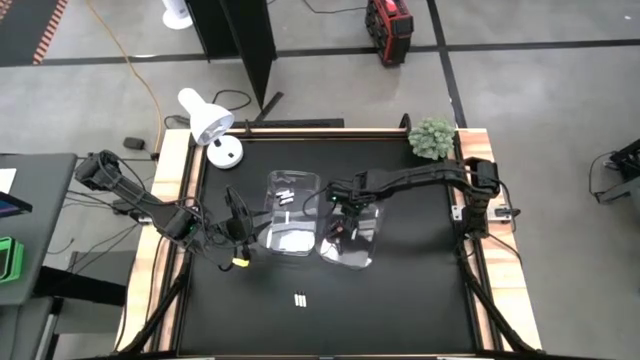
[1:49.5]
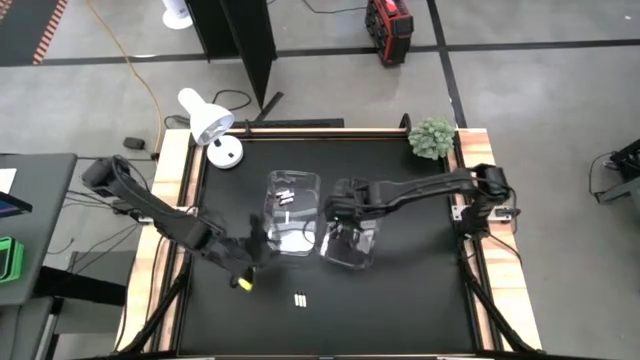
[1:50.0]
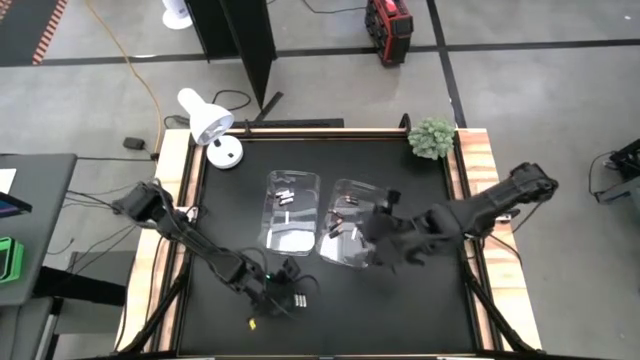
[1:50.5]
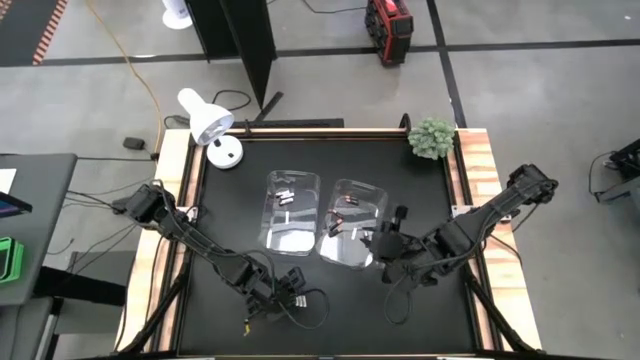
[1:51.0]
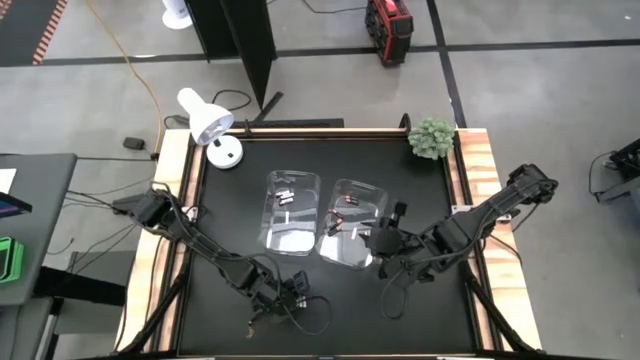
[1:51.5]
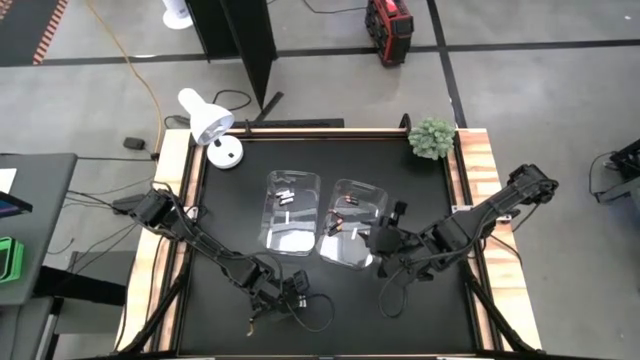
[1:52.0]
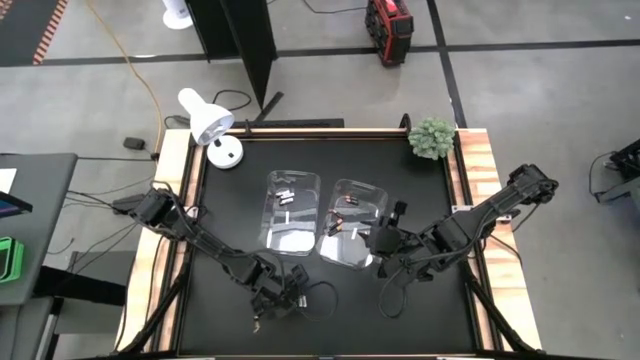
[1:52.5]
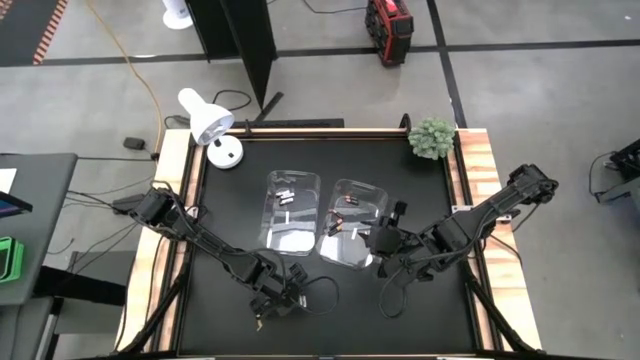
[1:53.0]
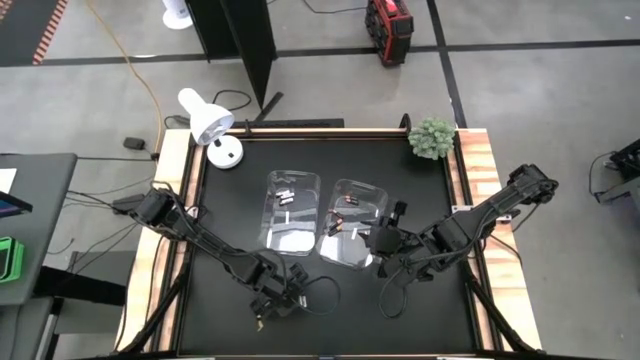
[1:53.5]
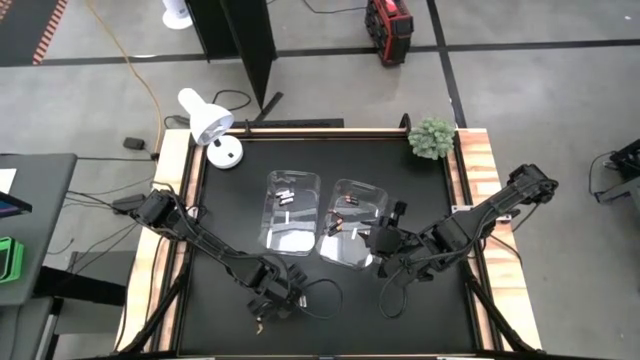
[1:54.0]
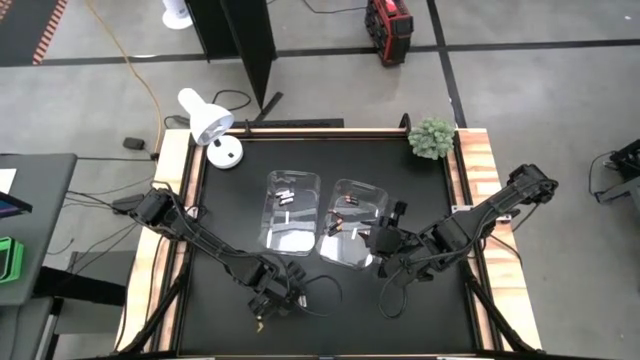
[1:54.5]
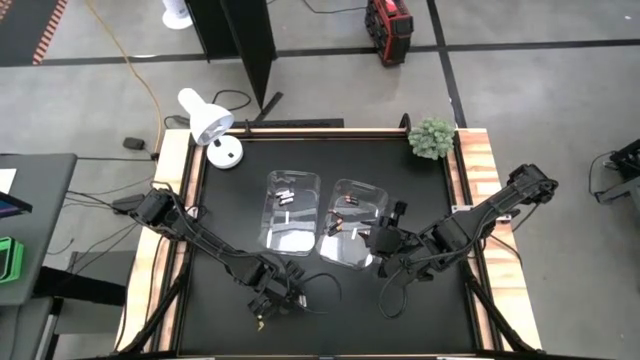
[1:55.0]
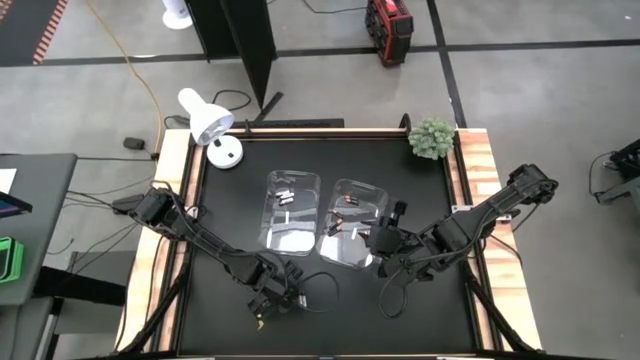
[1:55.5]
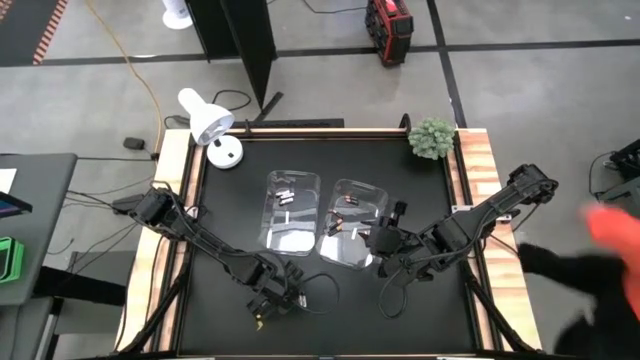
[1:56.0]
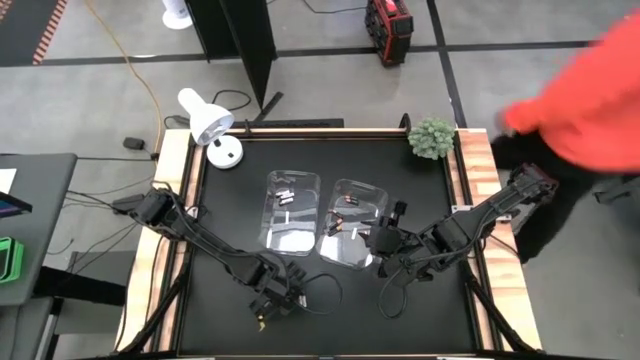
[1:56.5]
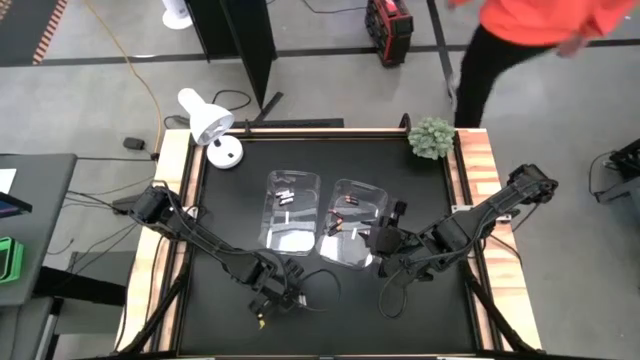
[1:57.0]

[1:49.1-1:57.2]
Task: Sort batteries
Put the white battery into the left transparent bin

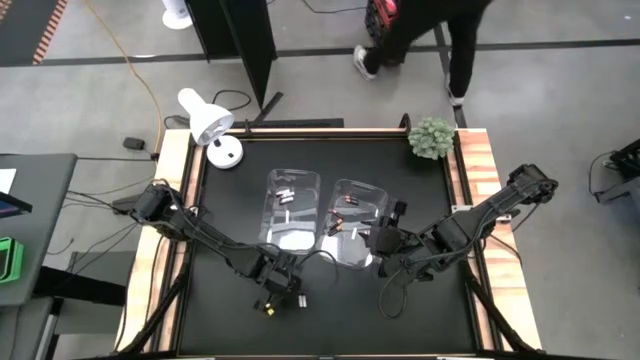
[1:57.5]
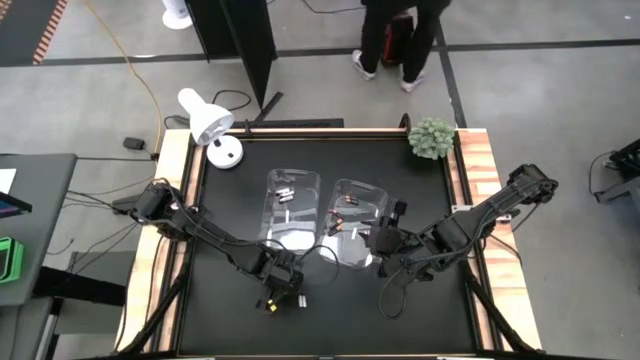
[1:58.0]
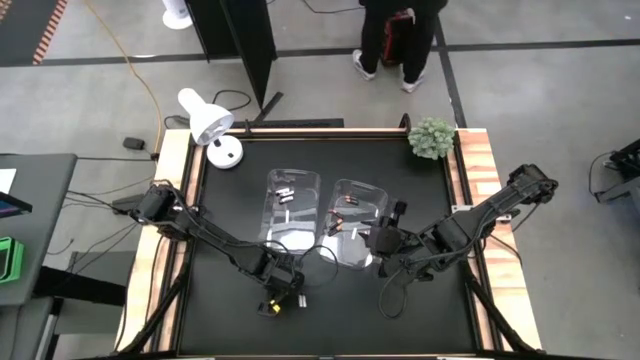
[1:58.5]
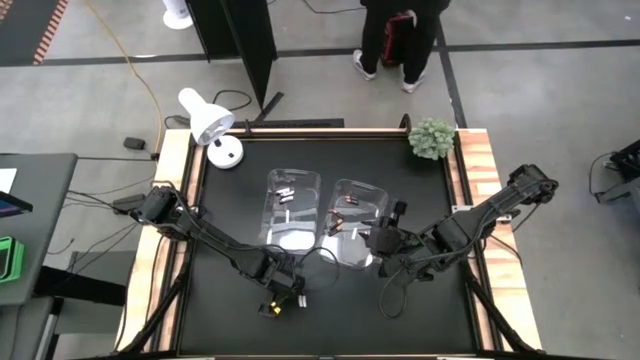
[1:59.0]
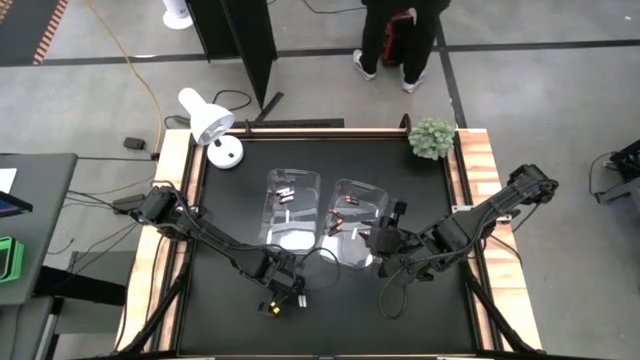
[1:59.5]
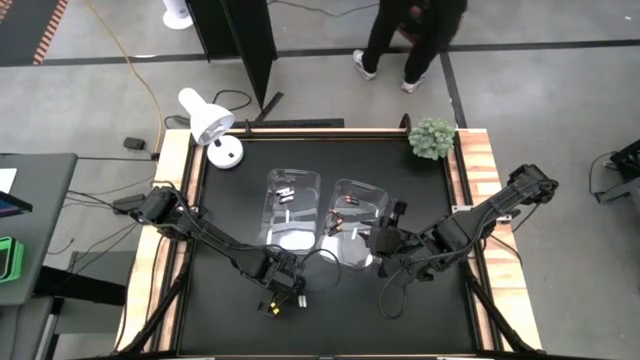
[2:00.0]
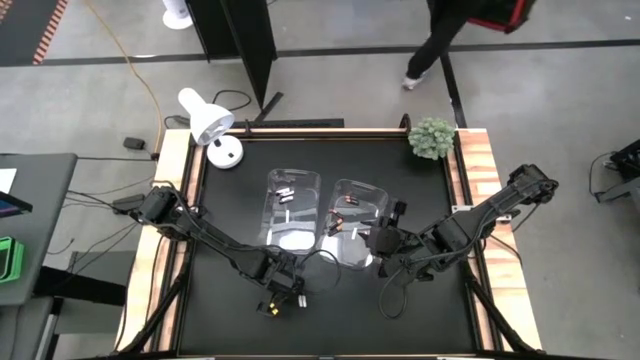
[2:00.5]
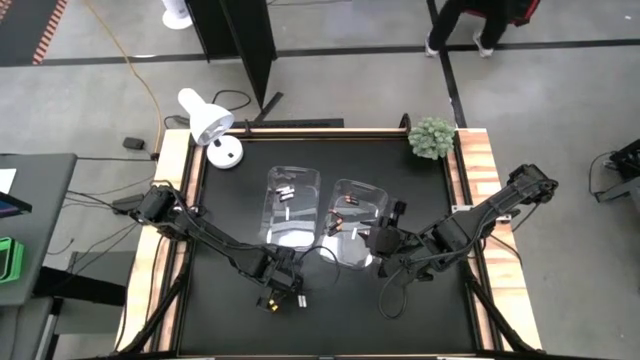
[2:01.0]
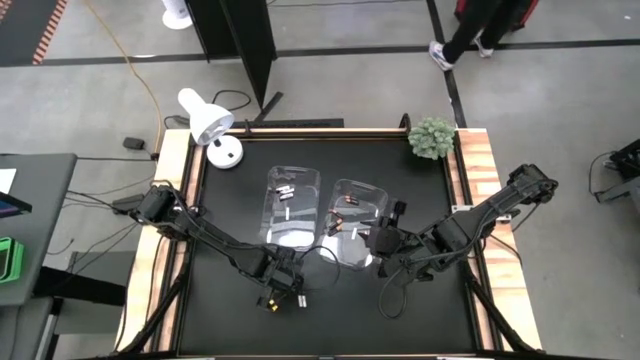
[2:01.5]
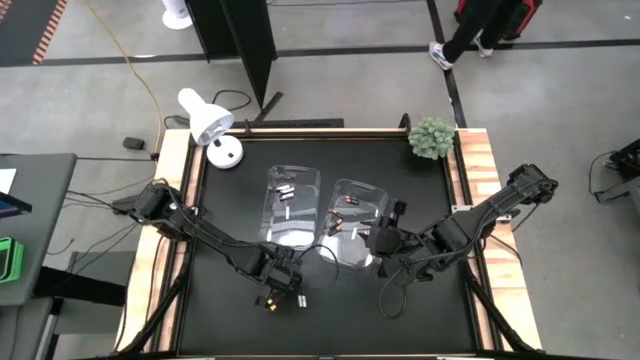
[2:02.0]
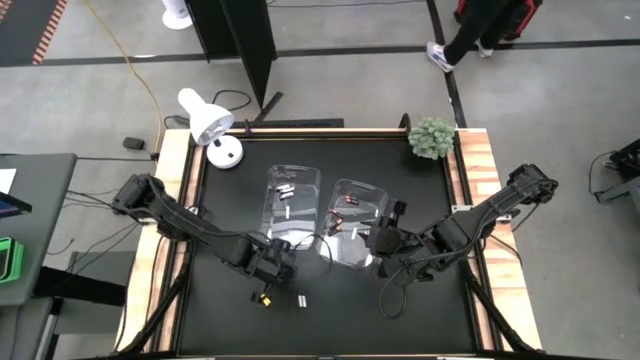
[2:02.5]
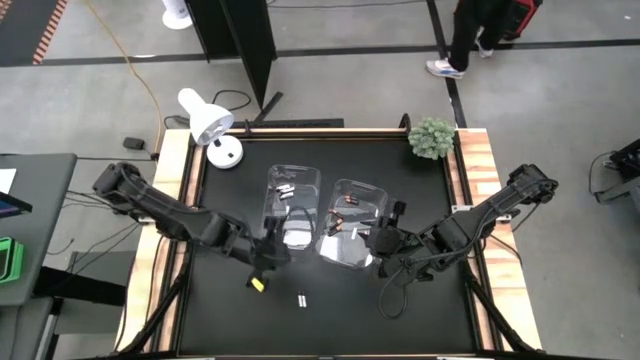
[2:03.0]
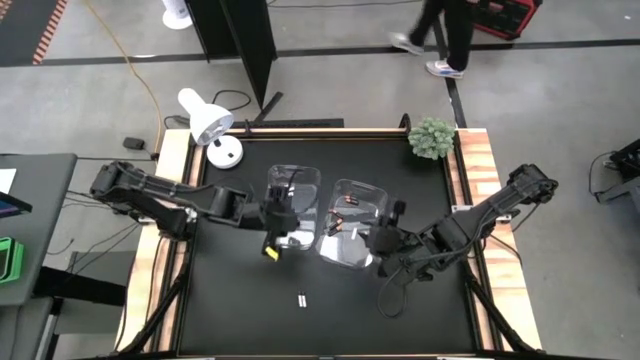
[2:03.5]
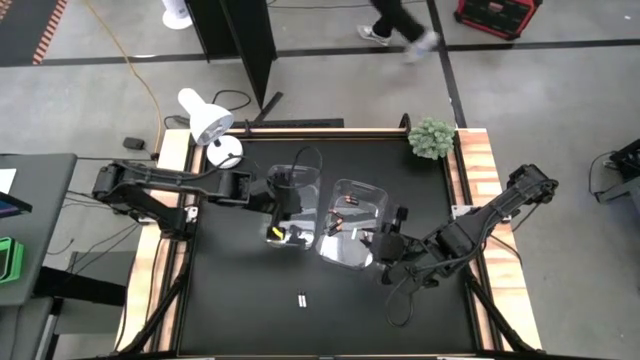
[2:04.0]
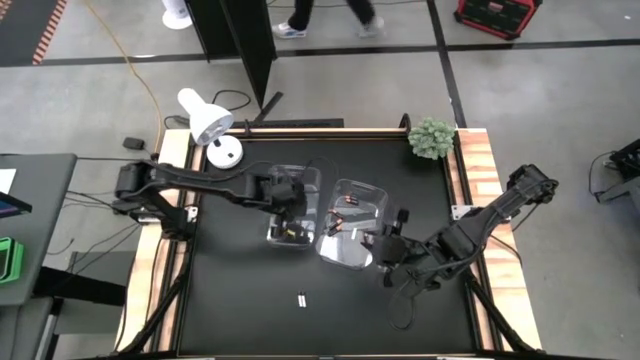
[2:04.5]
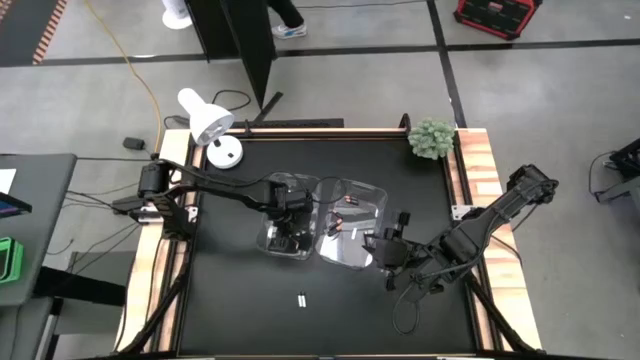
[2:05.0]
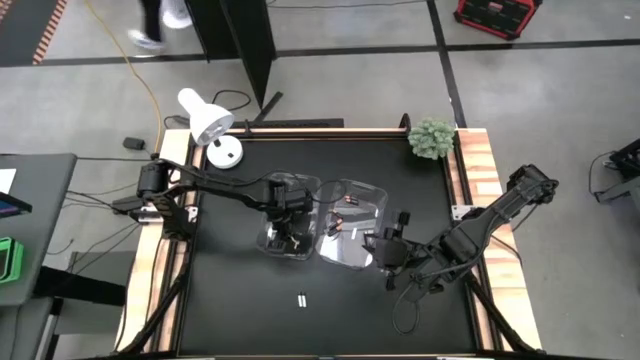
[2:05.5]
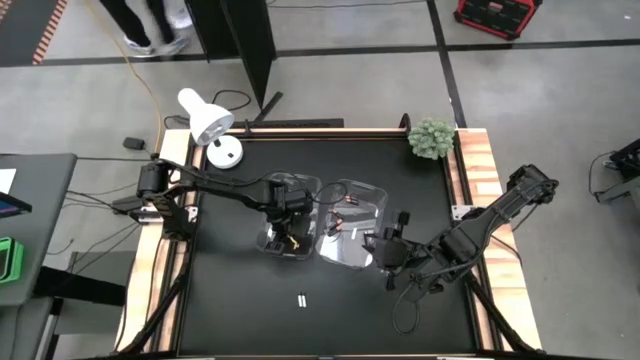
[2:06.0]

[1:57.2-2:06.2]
Put the white battery into the left transparent bin

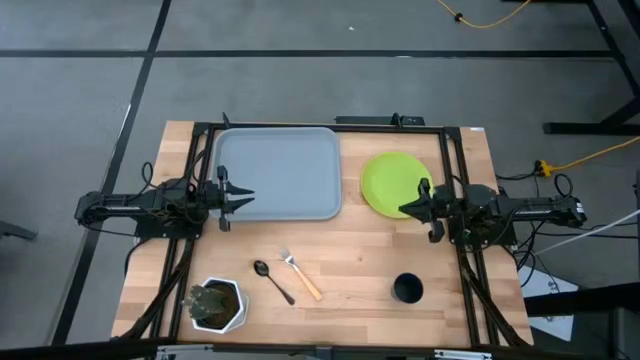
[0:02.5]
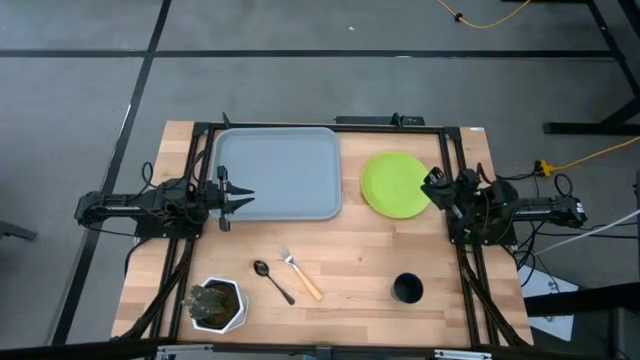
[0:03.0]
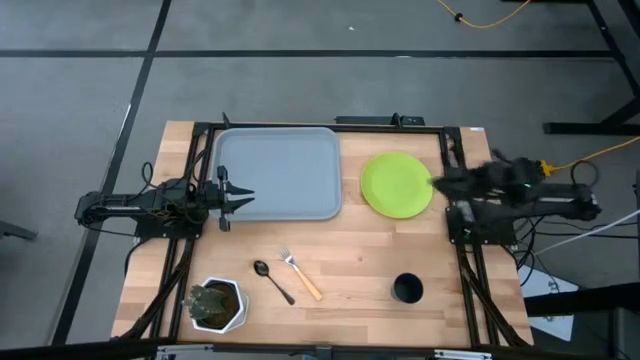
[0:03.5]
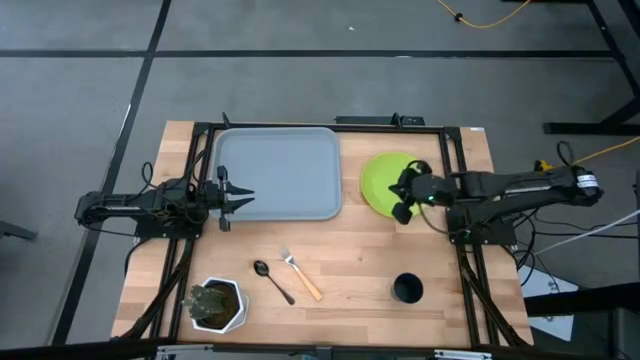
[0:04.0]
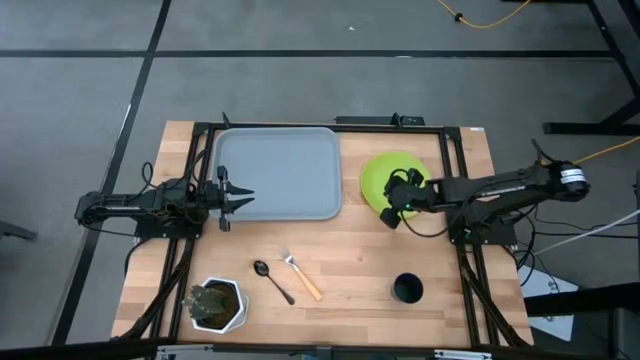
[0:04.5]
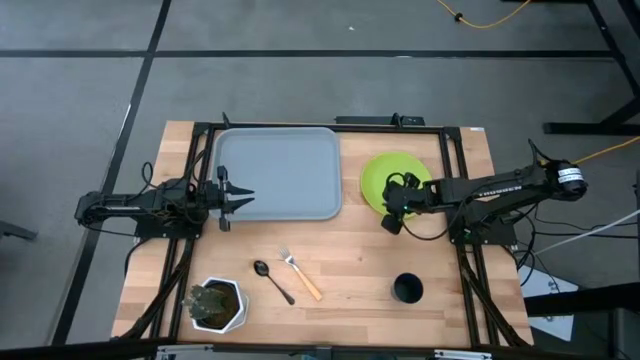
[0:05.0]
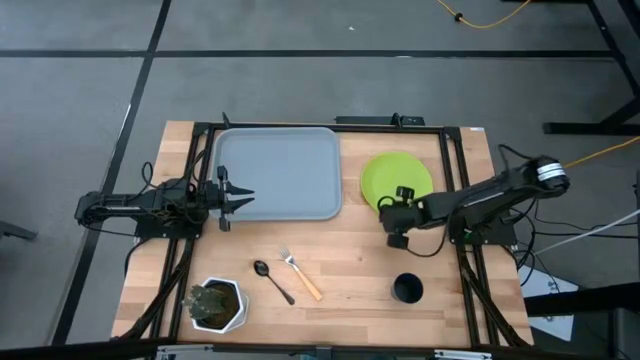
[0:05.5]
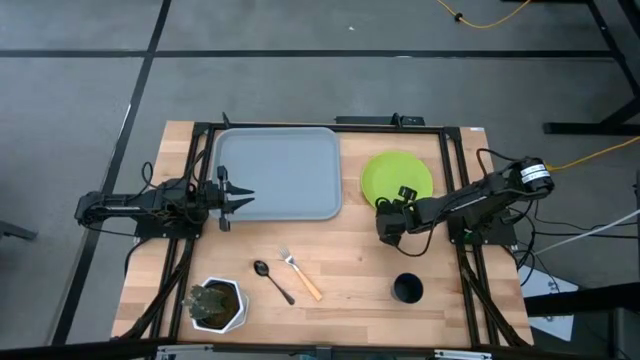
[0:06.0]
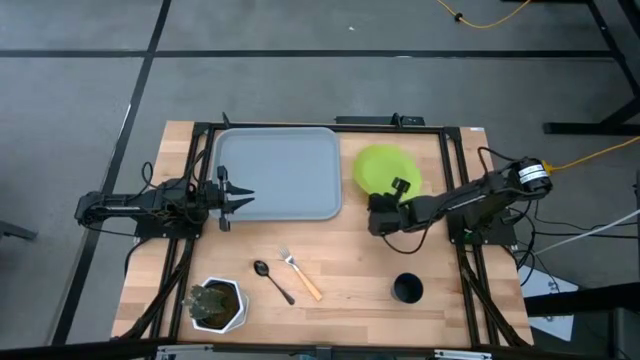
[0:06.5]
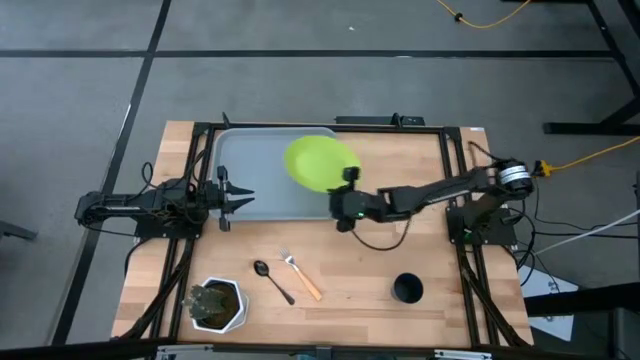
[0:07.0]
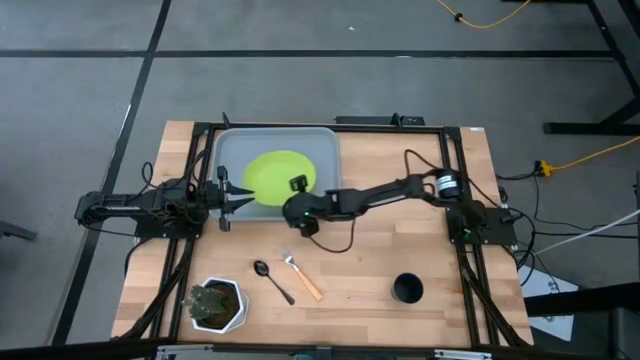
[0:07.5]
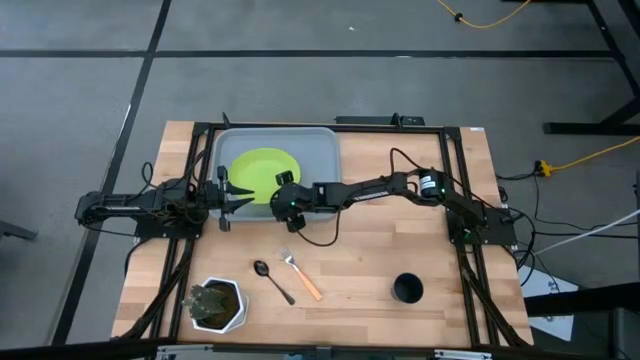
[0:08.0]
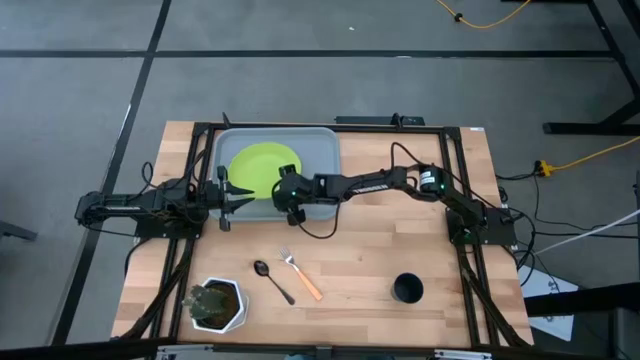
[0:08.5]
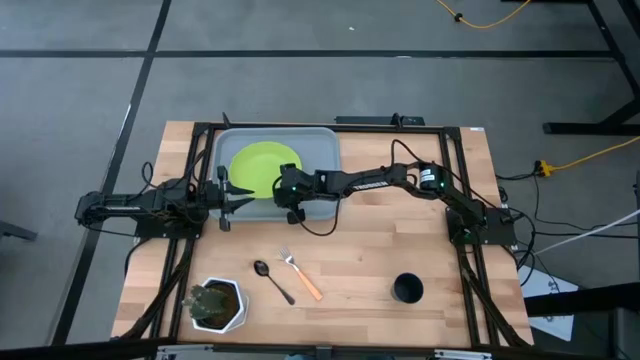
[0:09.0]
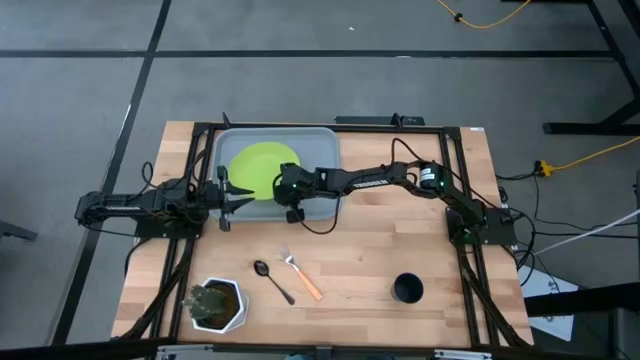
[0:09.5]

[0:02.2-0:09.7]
Task: Pick and place plate/cup/fork/spoon on tray
Put the green plate on the blue serving tray
